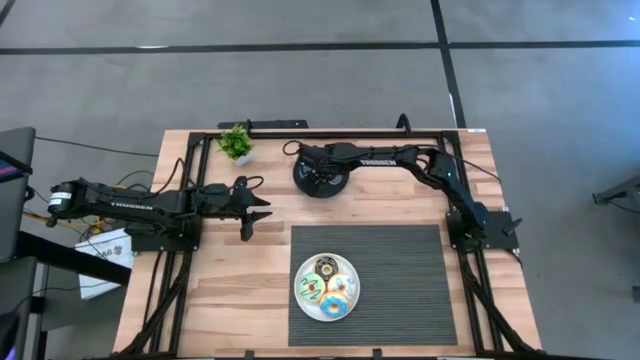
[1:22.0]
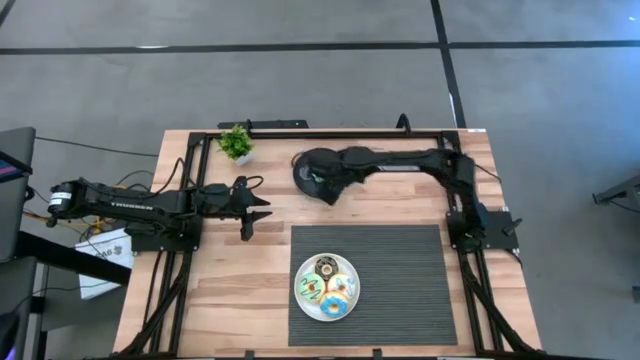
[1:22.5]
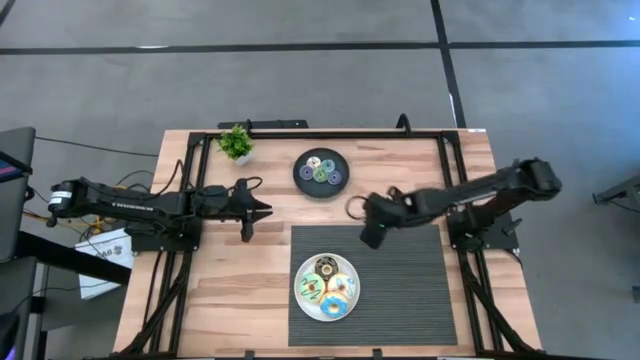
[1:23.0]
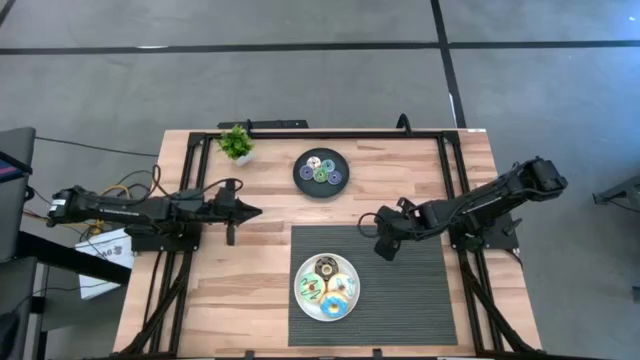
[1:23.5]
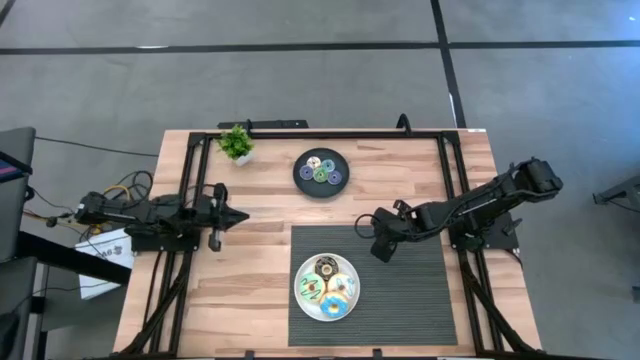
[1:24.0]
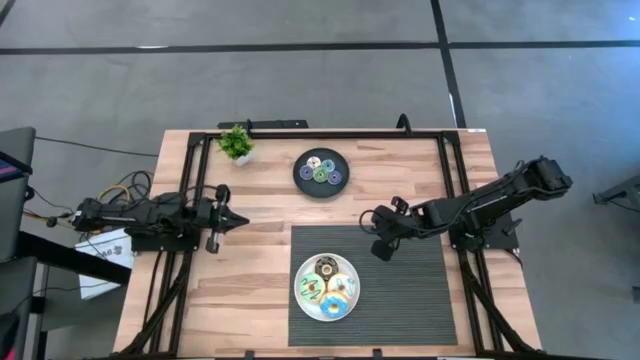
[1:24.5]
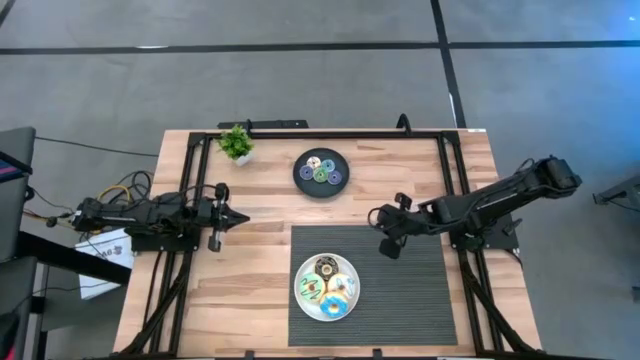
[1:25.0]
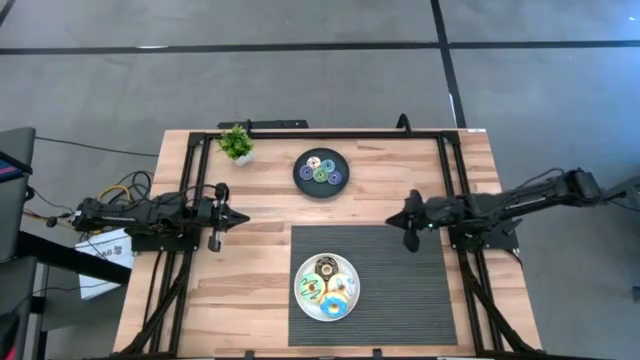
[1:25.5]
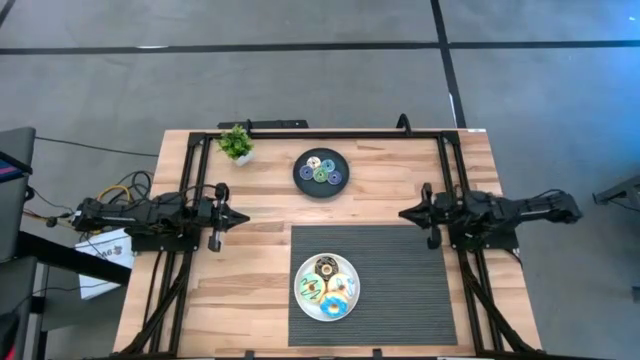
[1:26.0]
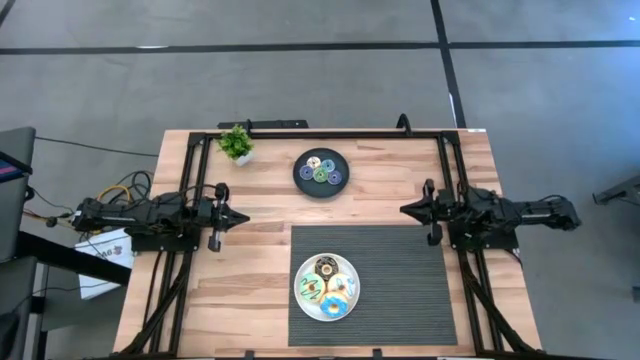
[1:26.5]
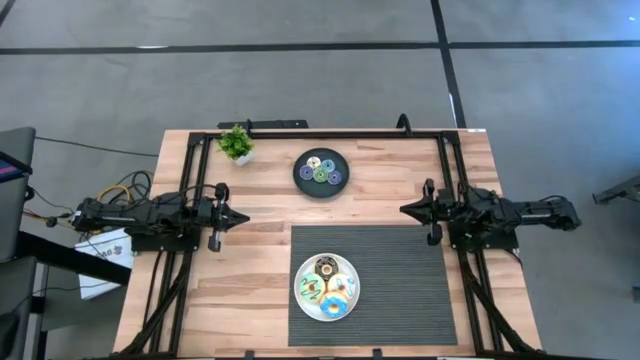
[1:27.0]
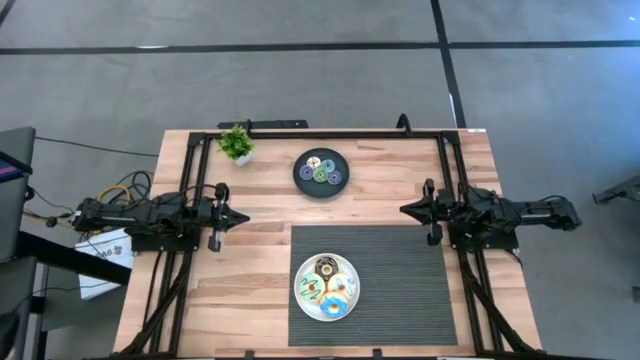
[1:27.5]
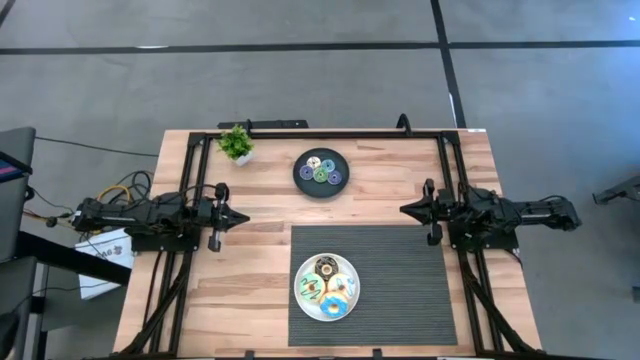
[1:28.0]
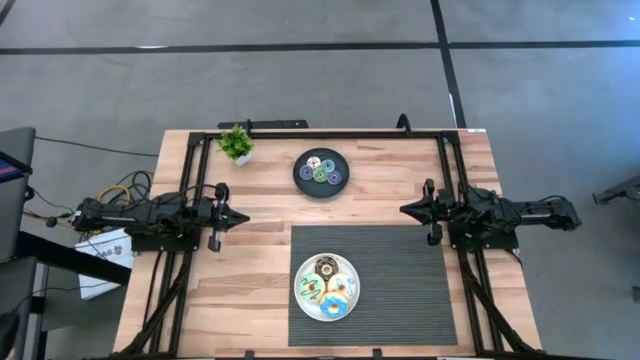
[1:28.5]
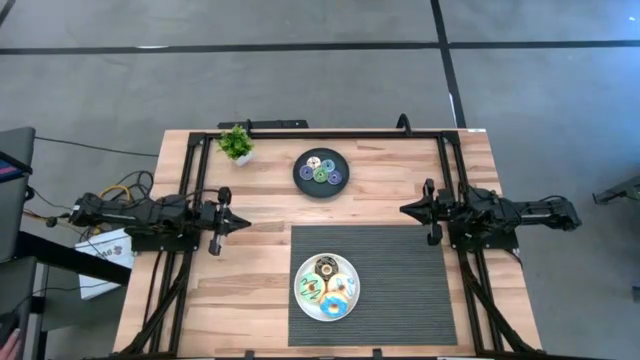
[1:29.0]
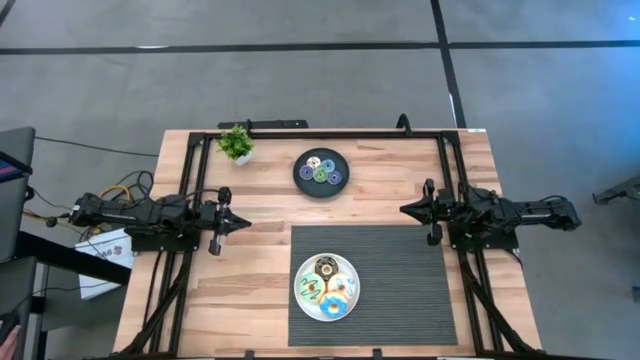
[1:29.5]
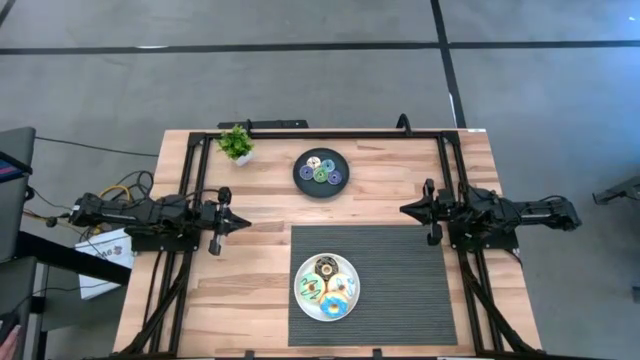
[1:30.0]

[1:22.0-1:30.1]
Task: Pick & Place donuts
Return to Home Position

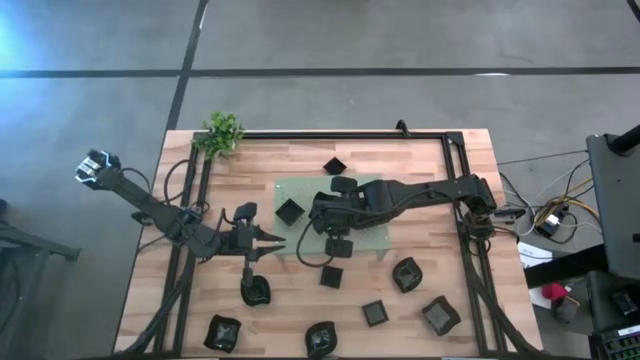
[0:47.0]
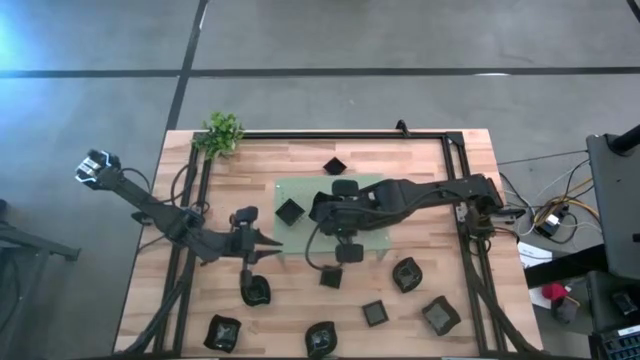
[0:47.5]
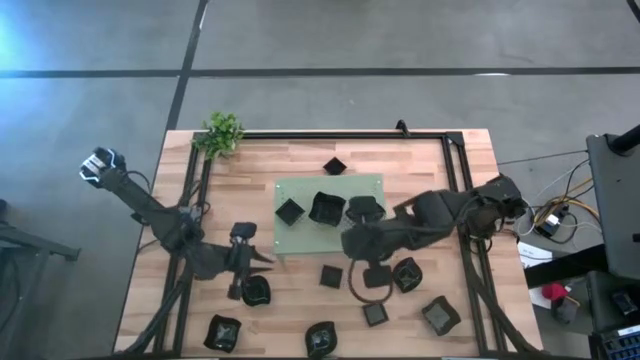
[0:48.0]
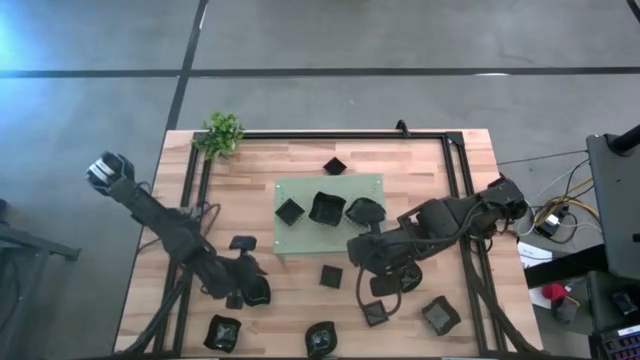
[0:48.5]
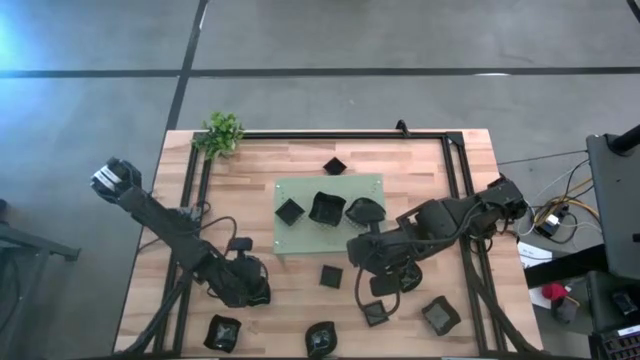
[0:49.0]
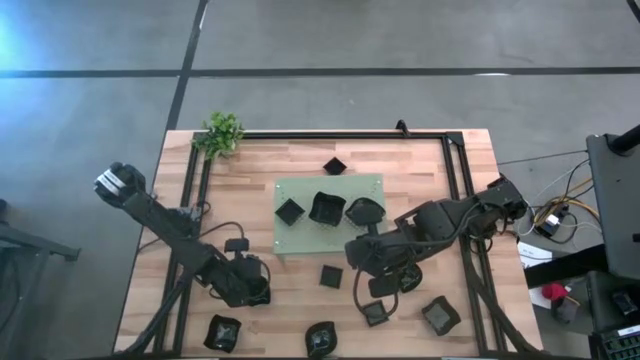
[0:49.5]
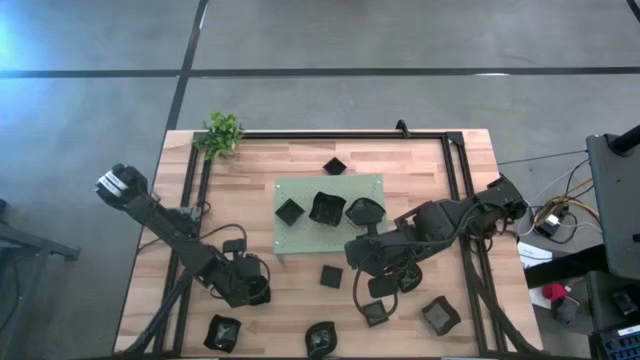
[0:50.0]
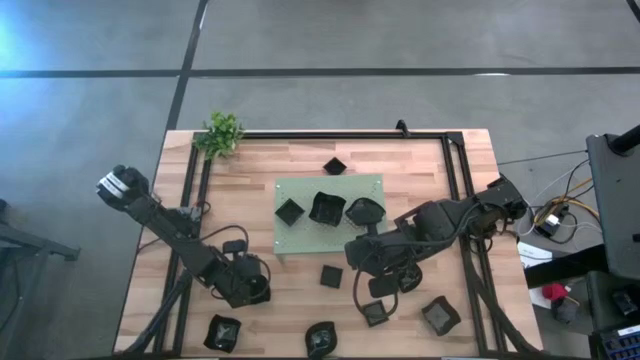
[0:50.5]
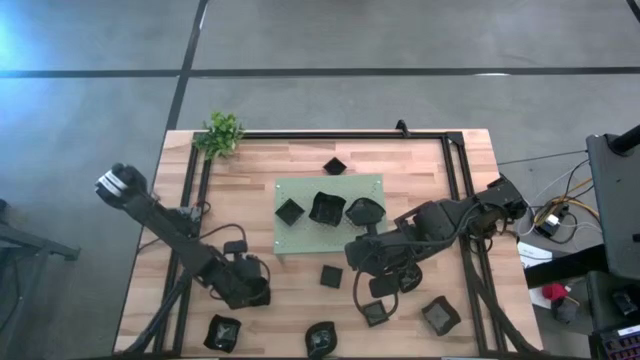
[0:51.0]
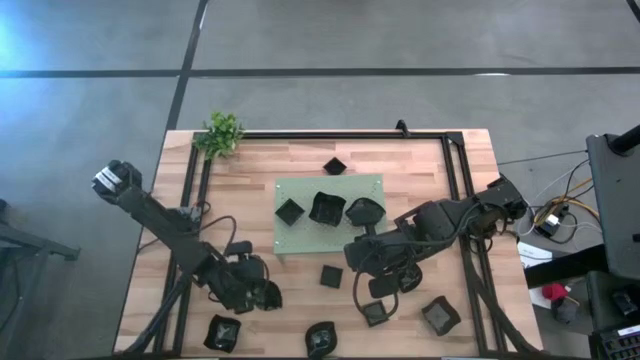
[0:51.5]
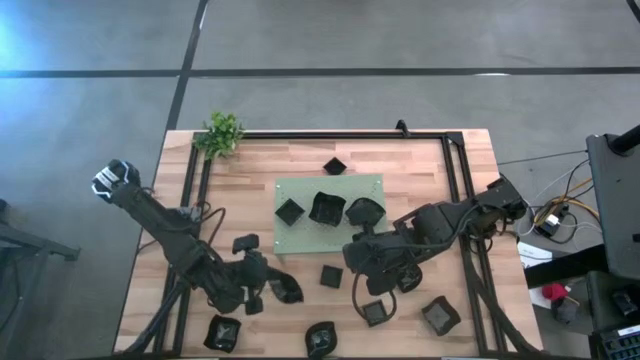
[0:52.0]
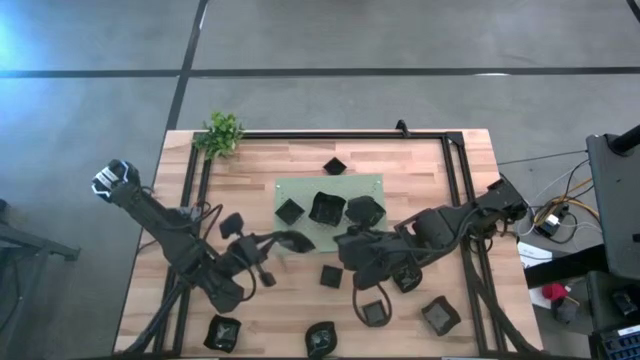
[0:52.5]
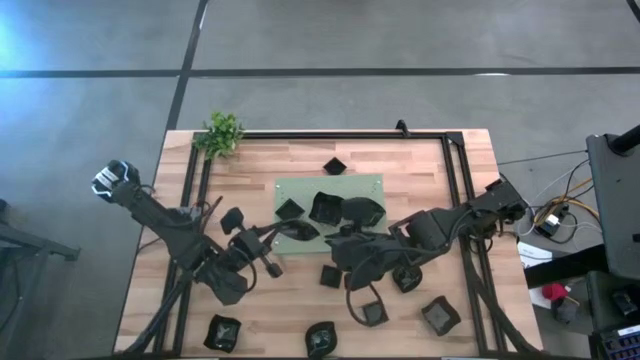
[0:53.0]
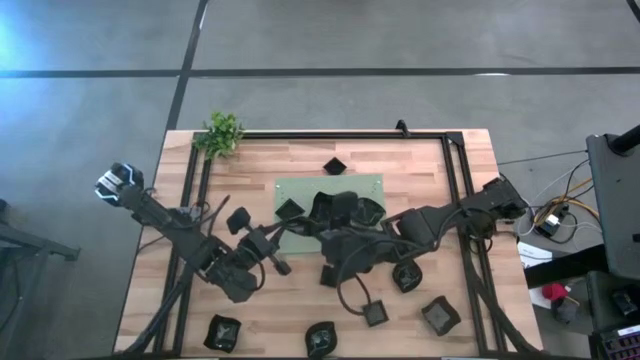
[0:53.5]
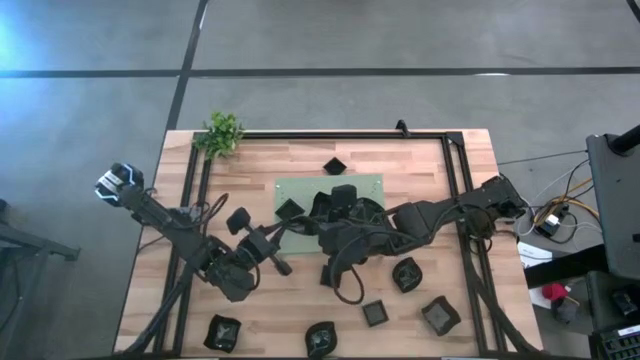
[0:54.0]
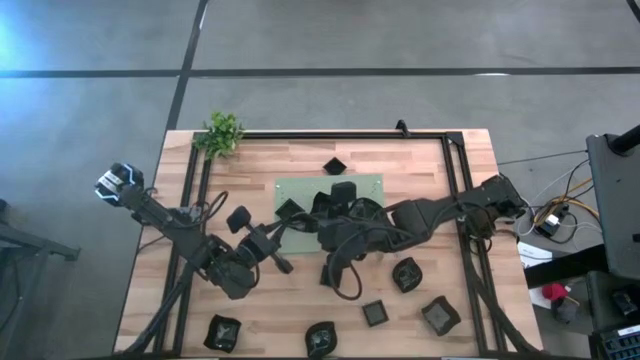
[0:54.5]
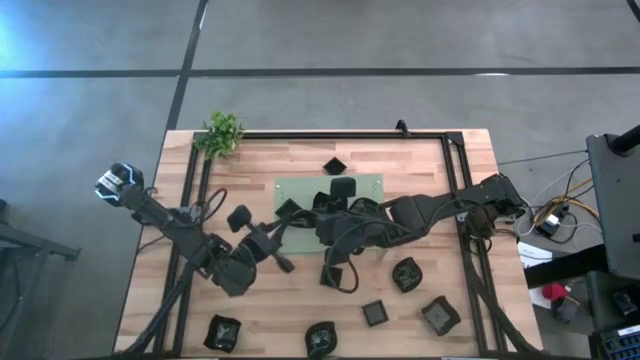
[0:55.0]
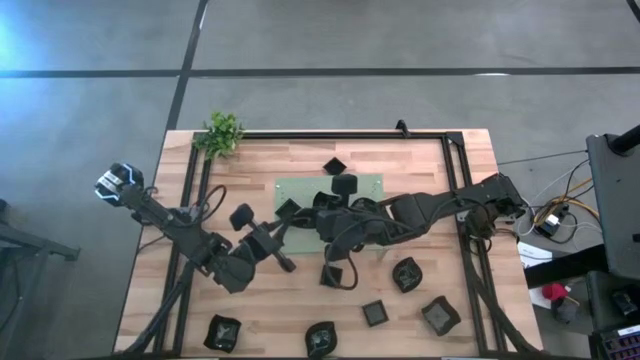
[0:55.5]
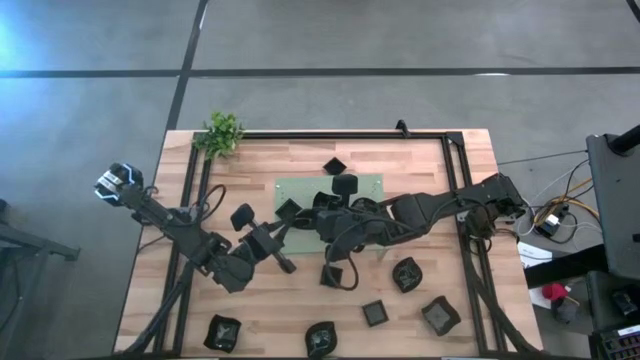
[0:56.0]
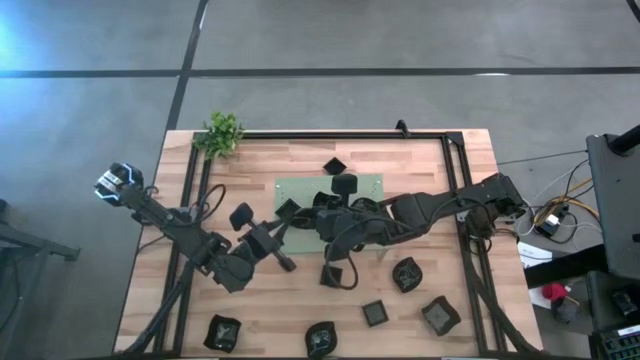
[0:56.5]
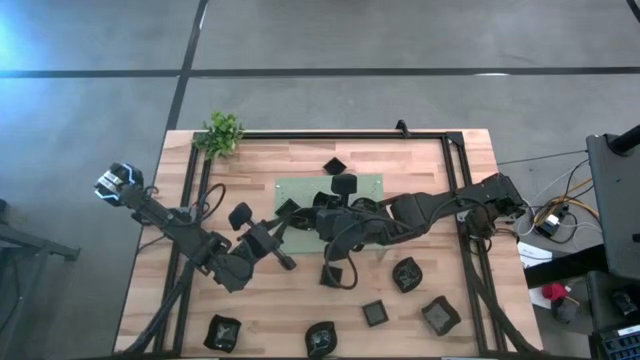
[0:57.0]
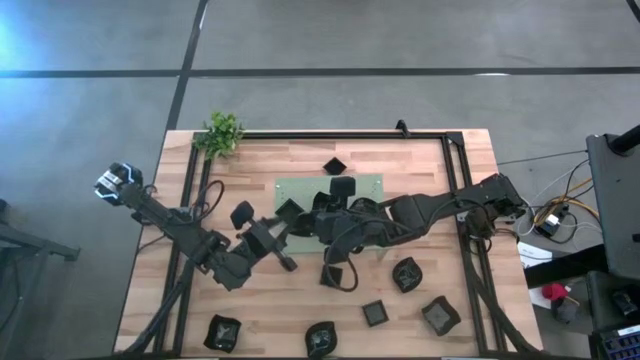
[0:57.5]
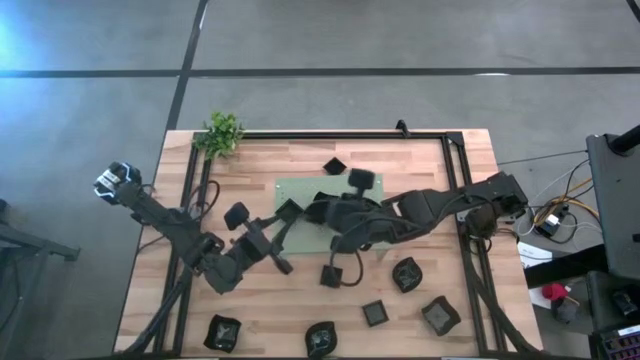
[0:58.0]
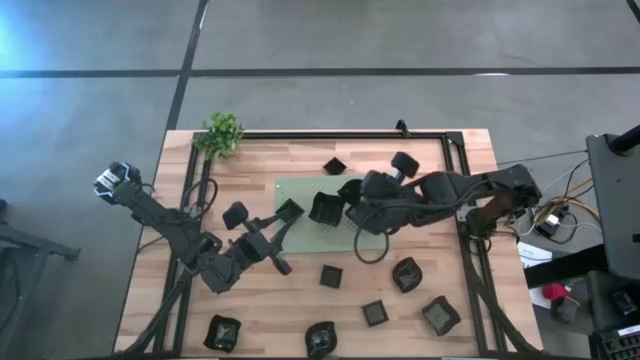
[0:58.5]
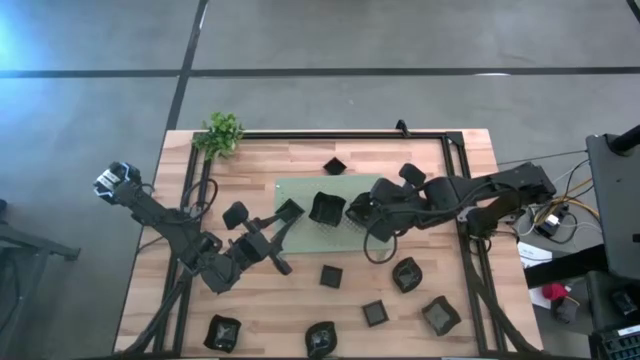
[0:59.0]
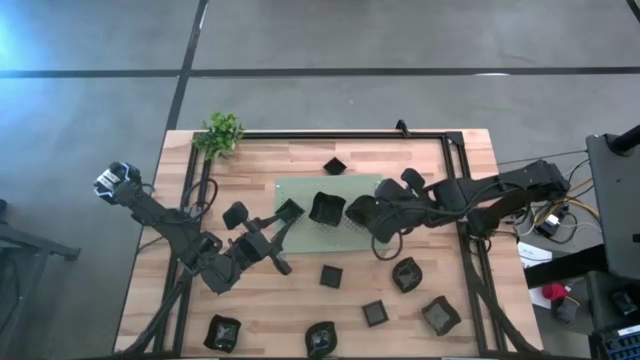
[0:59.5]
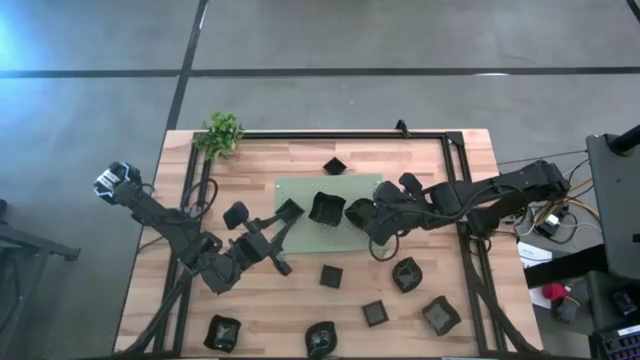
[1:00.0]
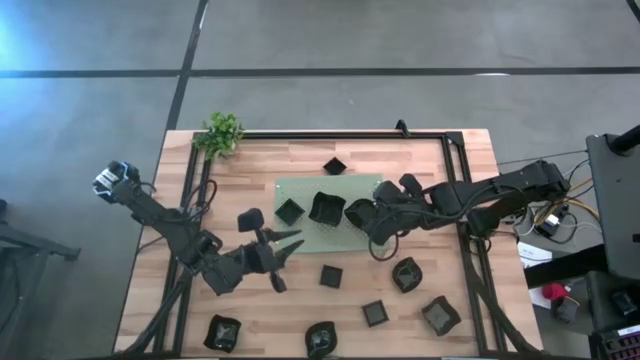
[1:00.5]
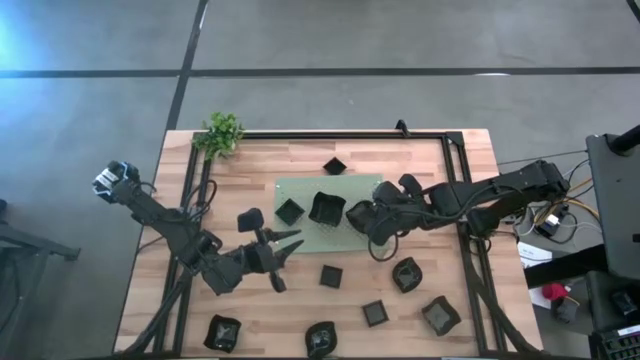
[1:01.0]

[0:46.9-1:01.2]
Task: Pick & Place Mini shaped plates
Stack the leaf shaped plate on top of the leaf shaped plate on the shelf
